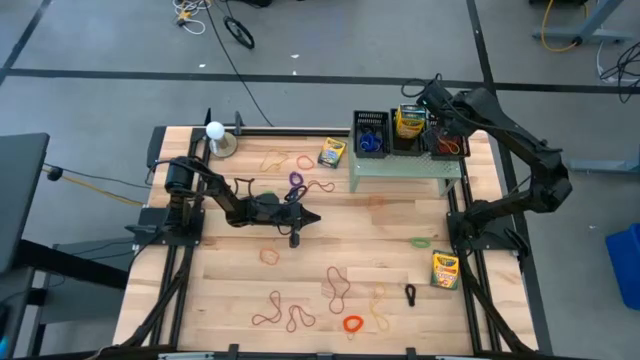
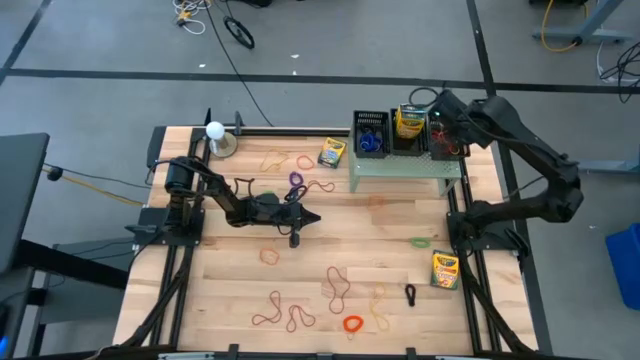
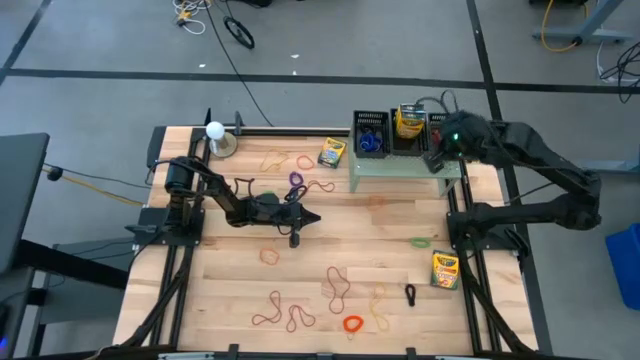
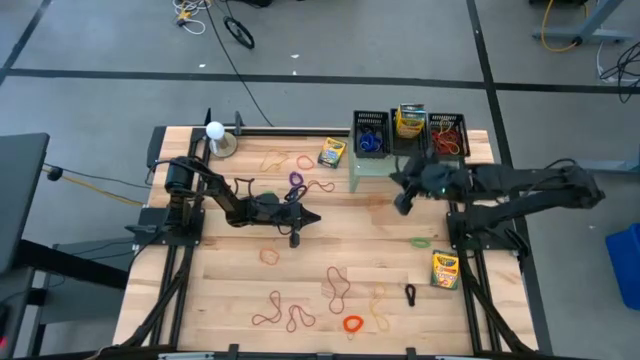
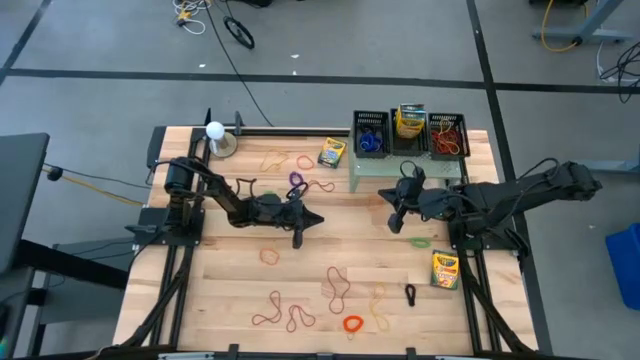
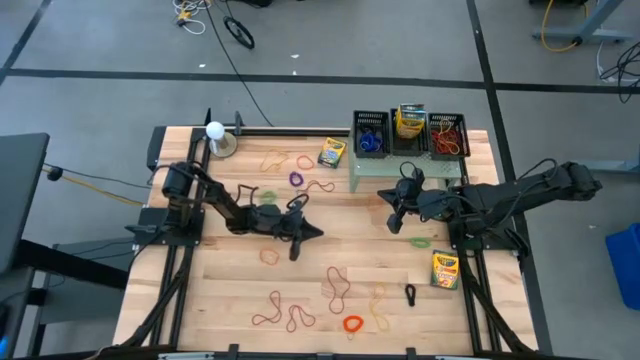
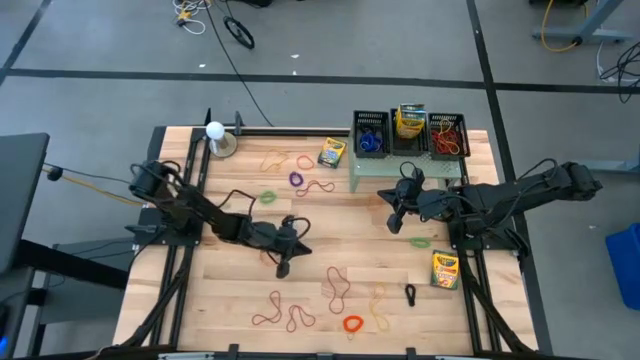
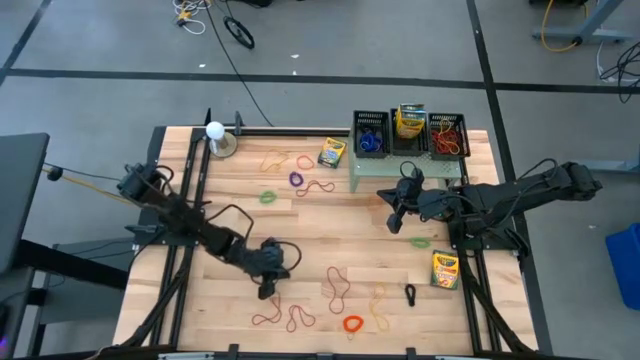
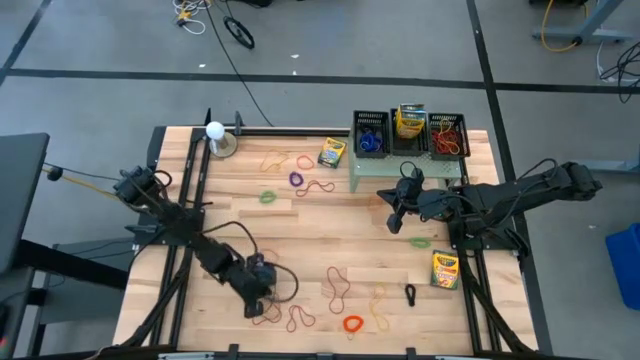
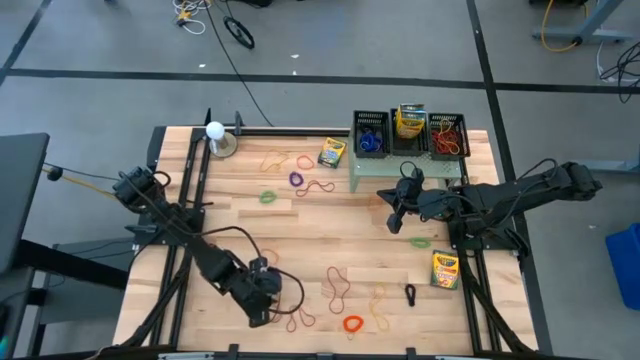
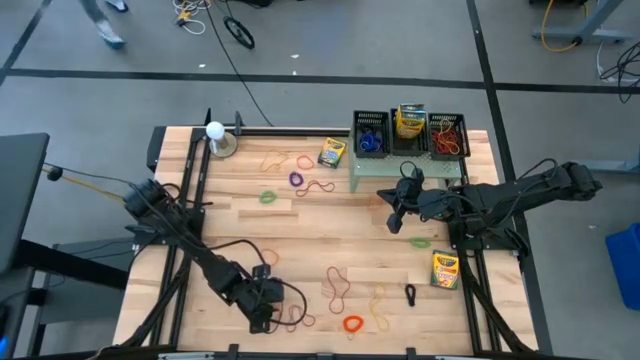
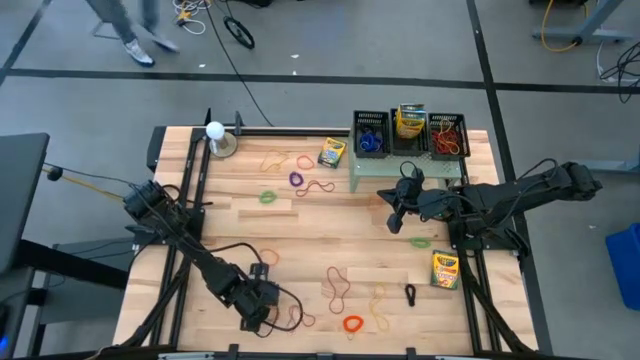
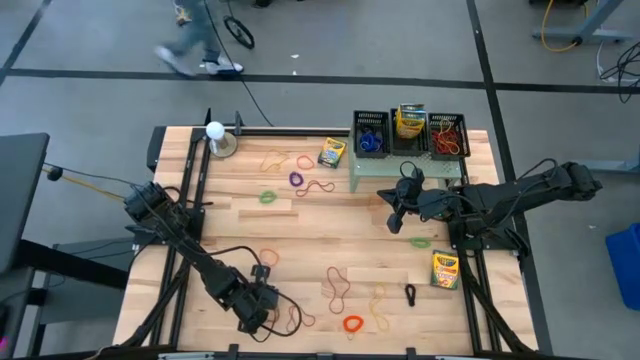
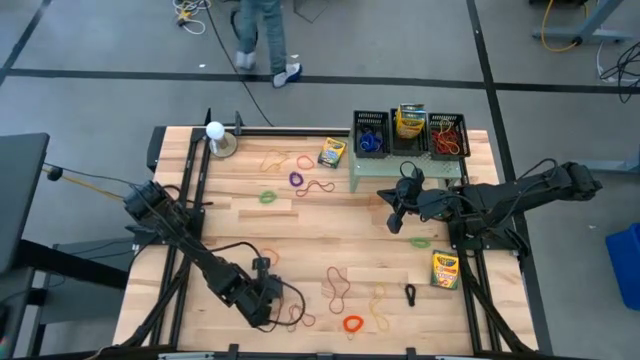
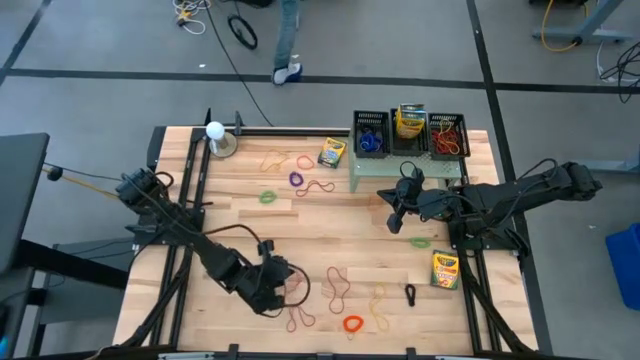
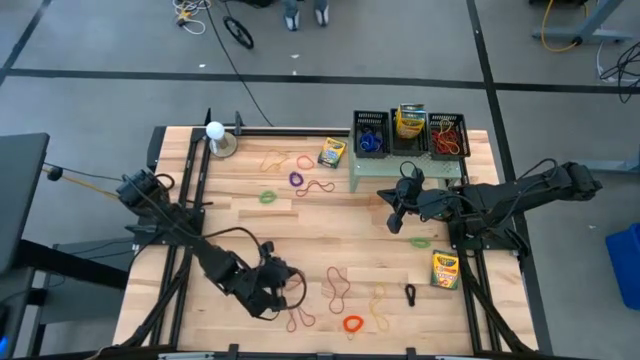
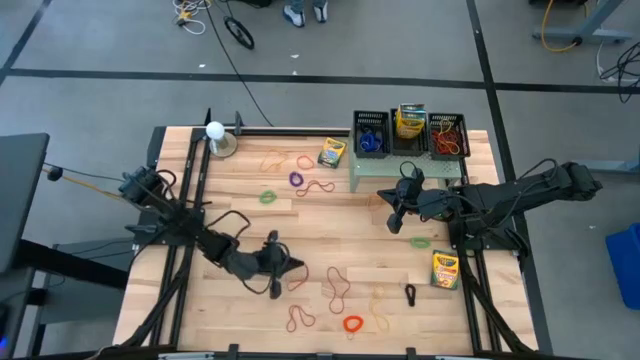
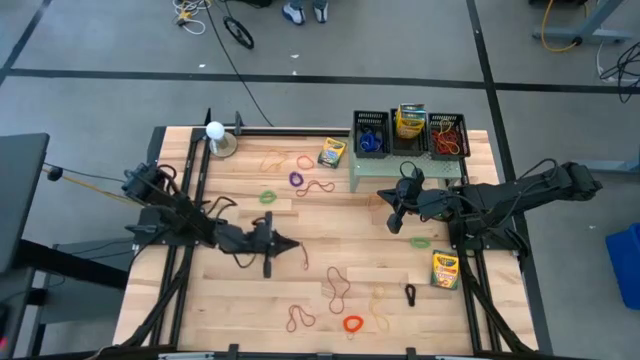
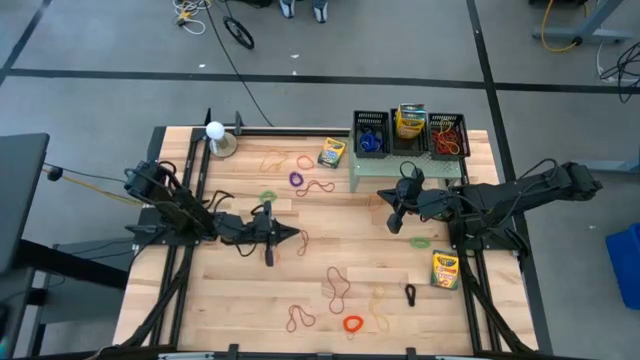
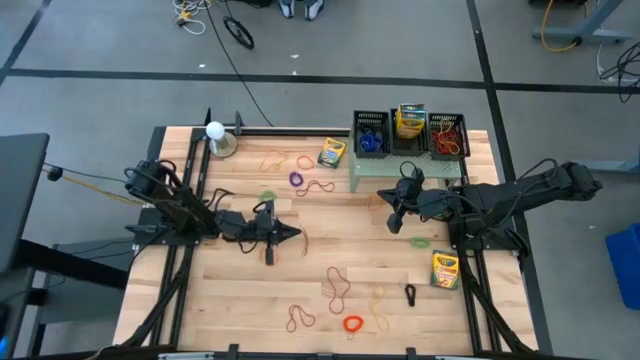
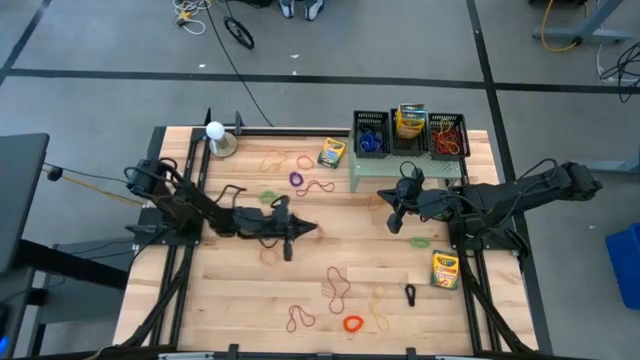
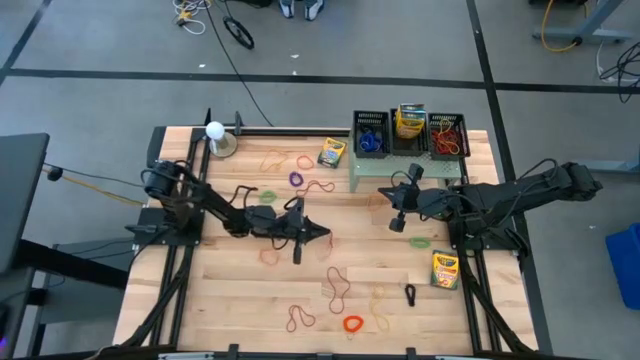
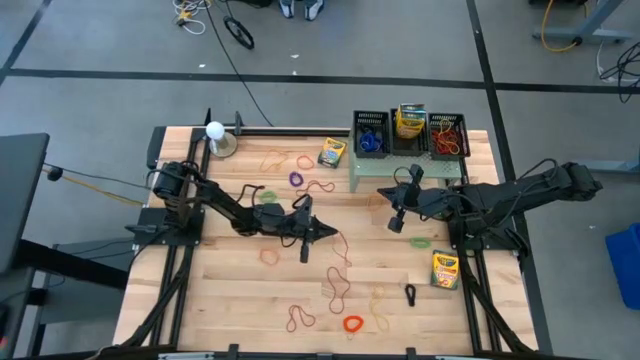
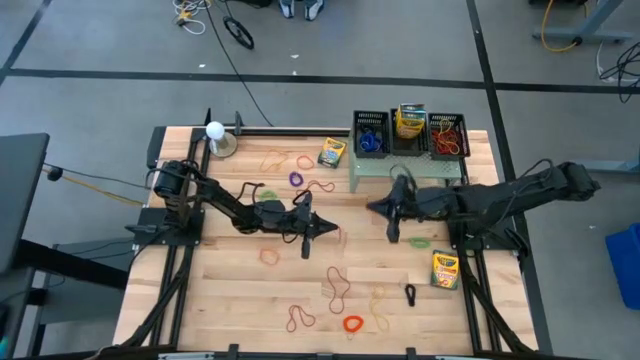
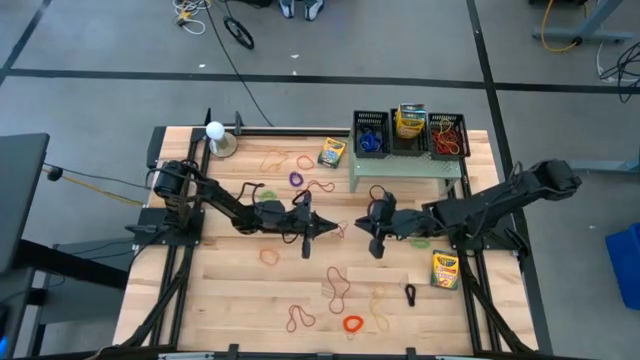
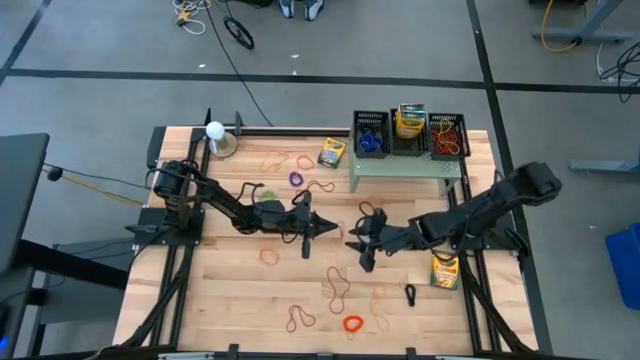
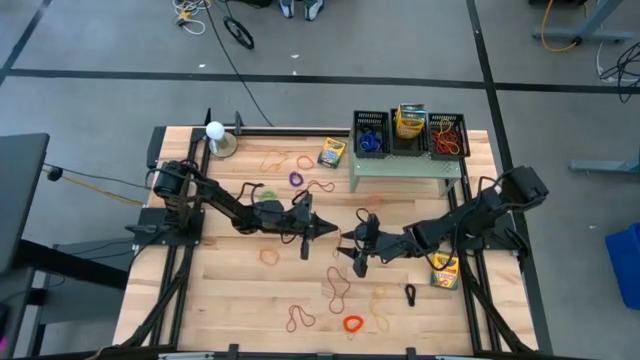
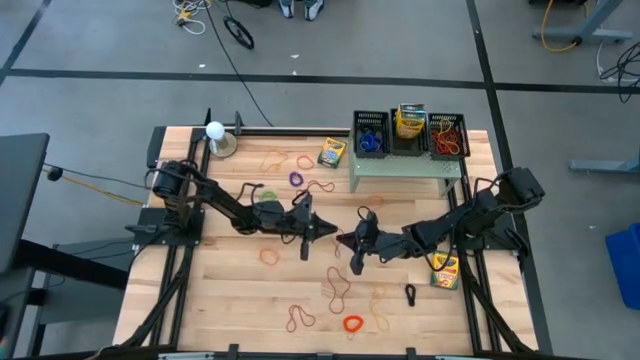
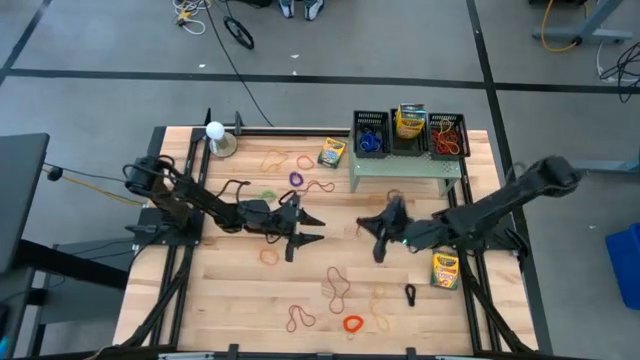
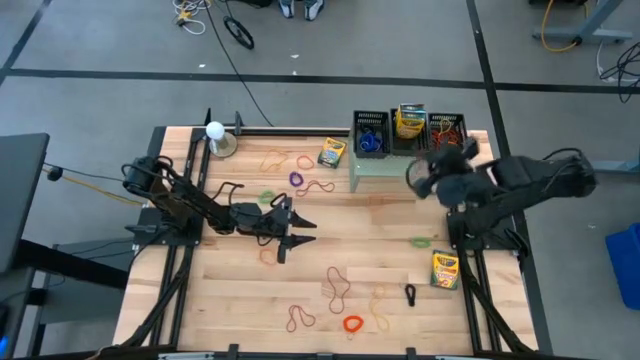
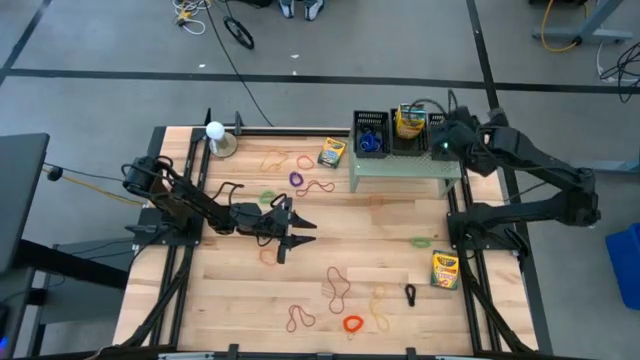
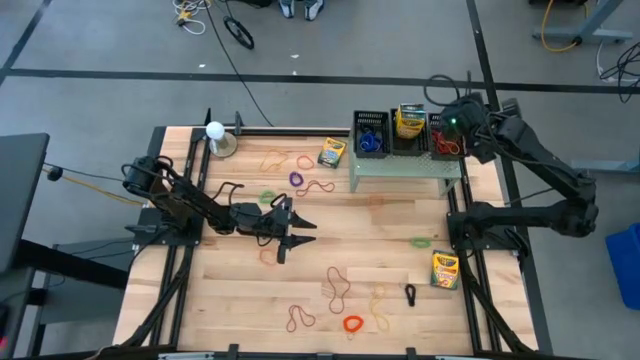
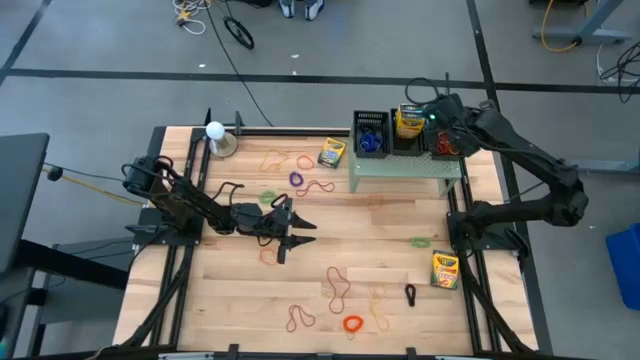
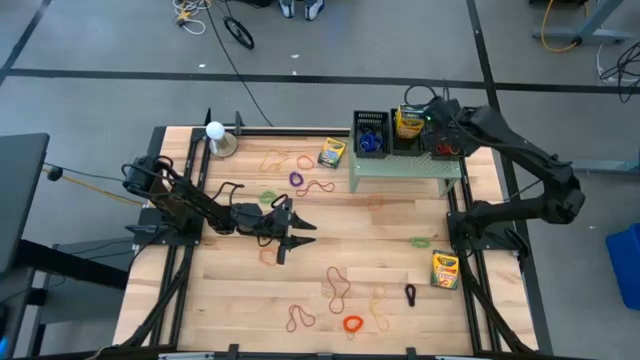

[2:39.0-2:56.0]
Task: Pick & Place Office Desk Supplies
Put the red rubber band into the right black basket on the shelf

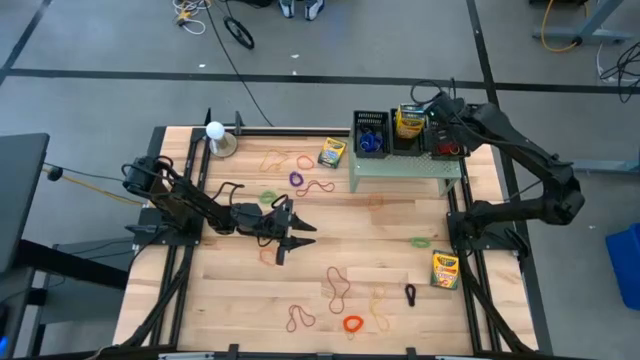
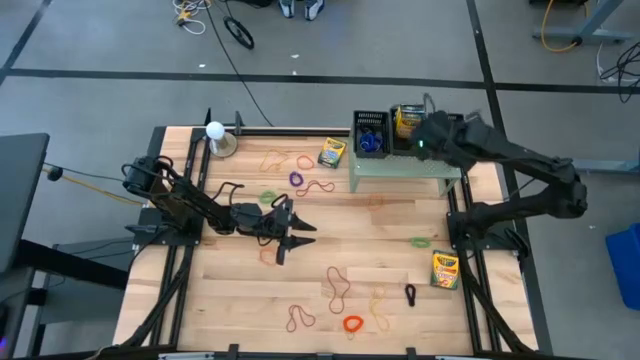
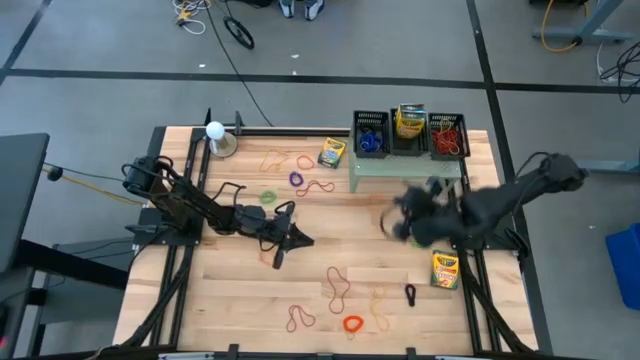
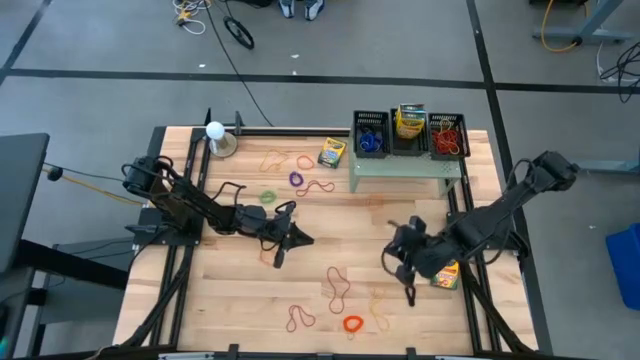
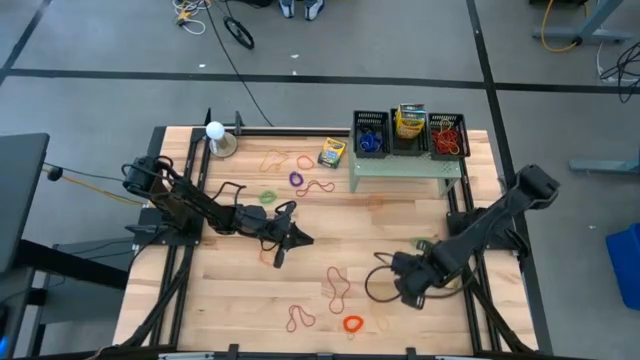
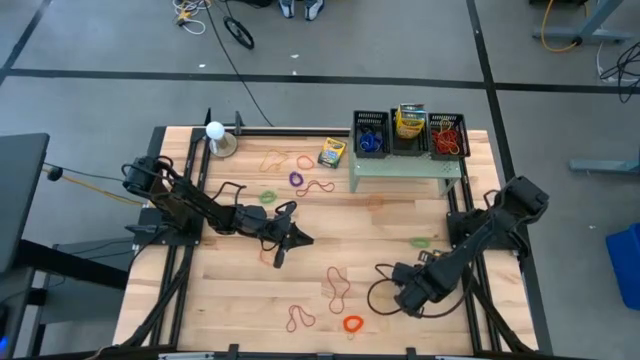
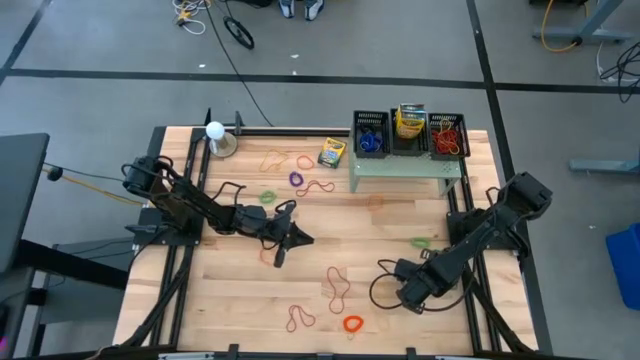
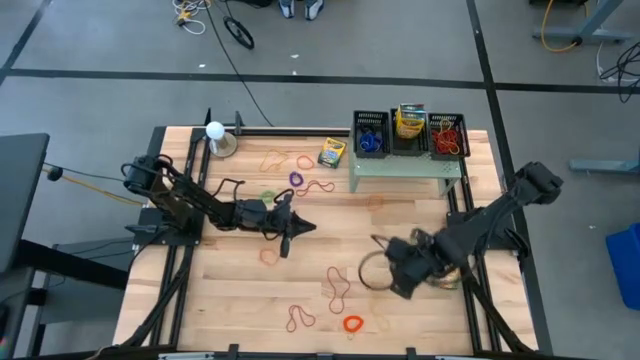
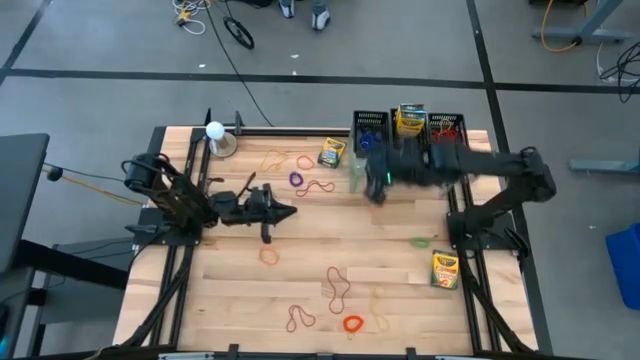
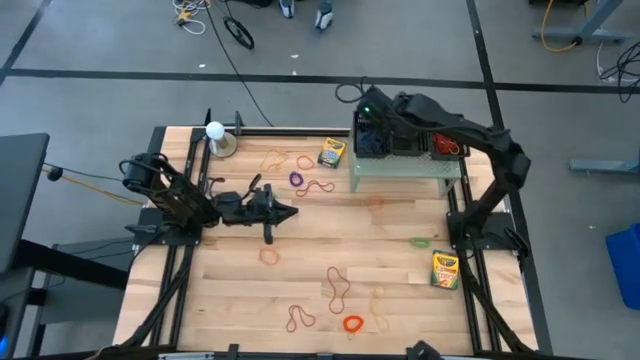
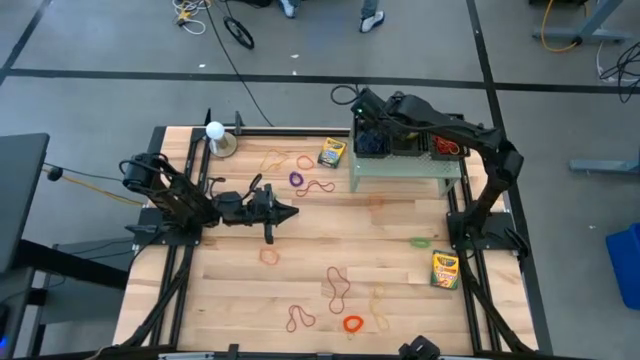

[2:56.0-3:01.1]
Put the black spring keychain into the left black basket on the shelf
